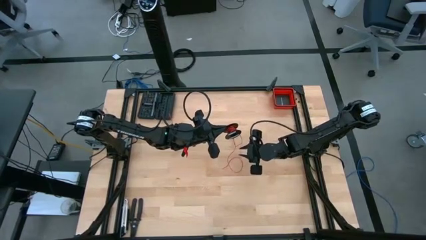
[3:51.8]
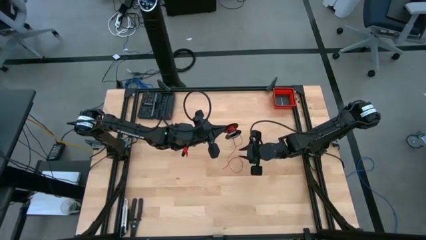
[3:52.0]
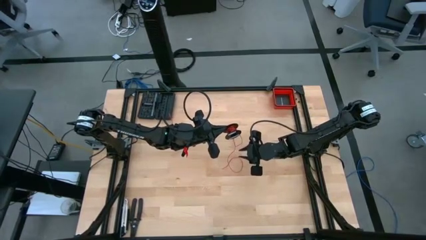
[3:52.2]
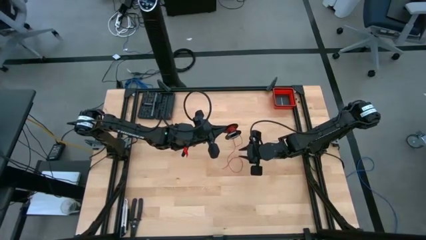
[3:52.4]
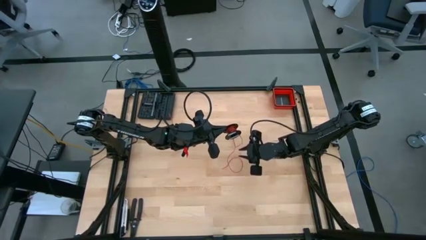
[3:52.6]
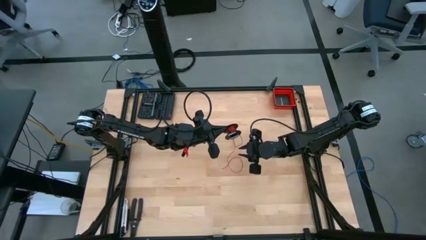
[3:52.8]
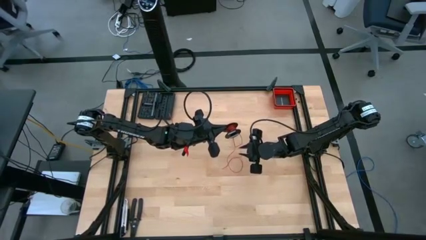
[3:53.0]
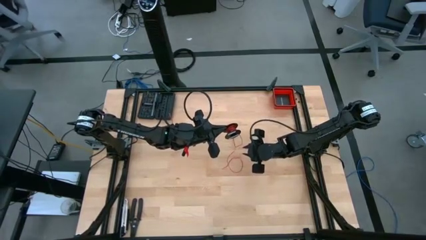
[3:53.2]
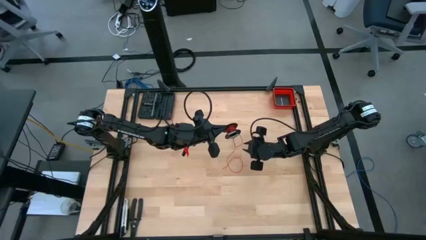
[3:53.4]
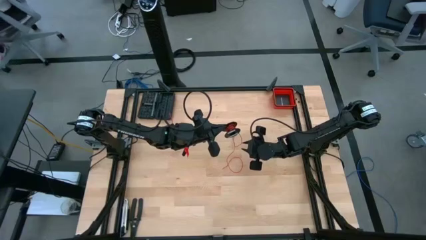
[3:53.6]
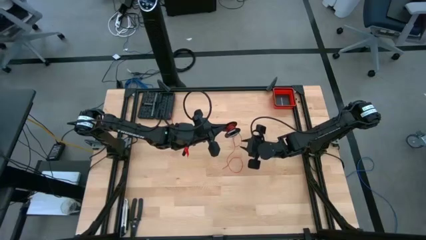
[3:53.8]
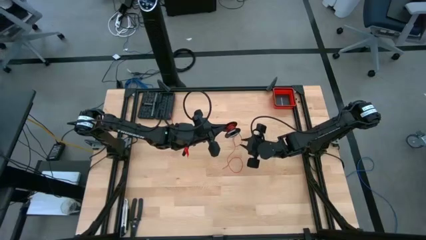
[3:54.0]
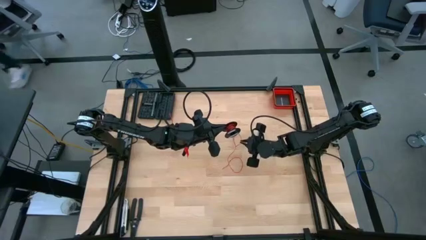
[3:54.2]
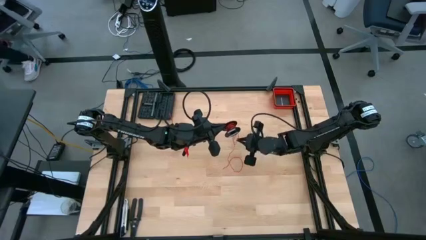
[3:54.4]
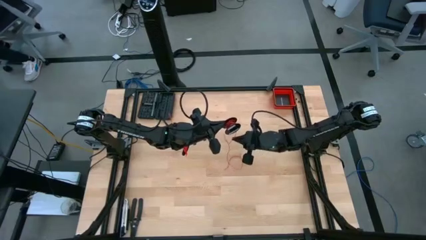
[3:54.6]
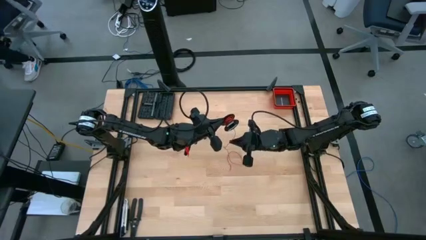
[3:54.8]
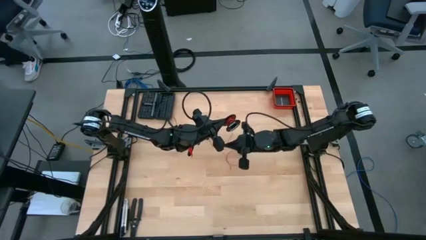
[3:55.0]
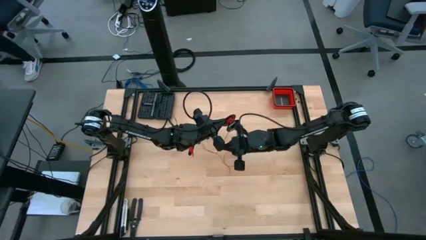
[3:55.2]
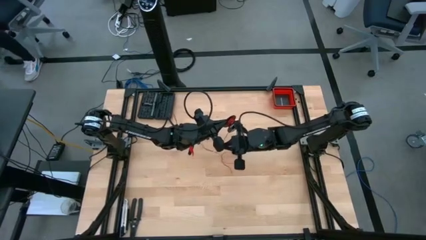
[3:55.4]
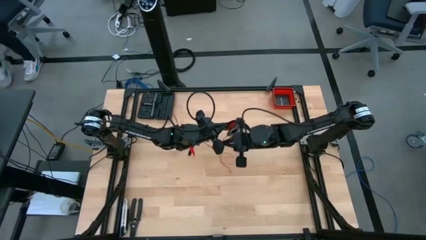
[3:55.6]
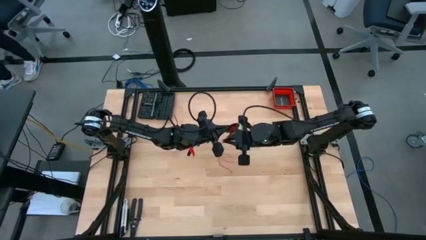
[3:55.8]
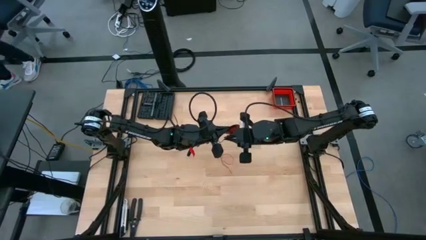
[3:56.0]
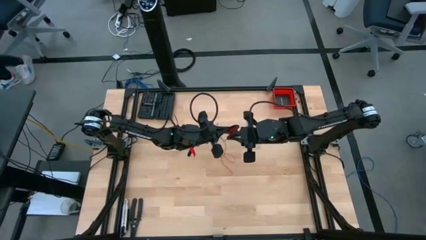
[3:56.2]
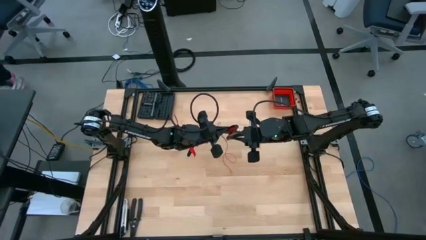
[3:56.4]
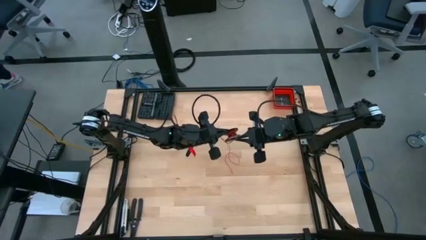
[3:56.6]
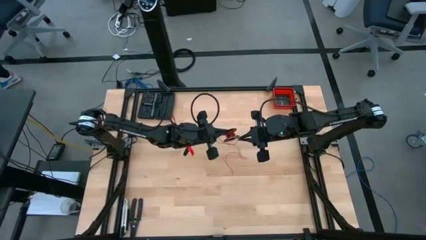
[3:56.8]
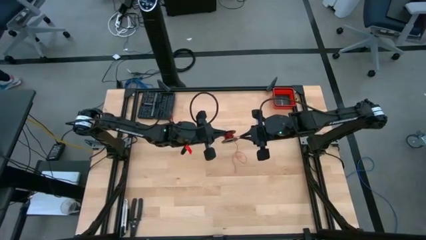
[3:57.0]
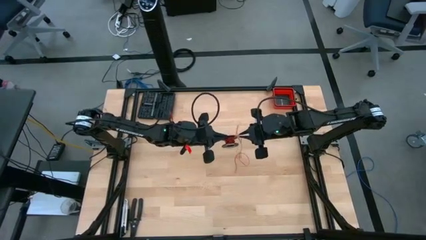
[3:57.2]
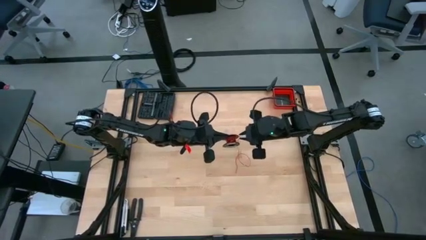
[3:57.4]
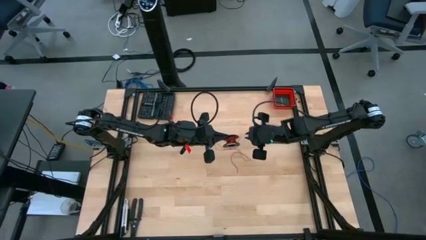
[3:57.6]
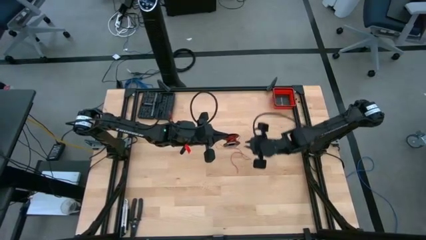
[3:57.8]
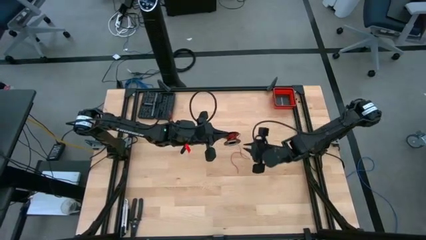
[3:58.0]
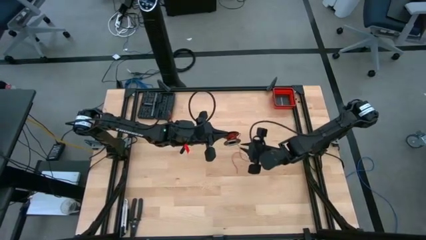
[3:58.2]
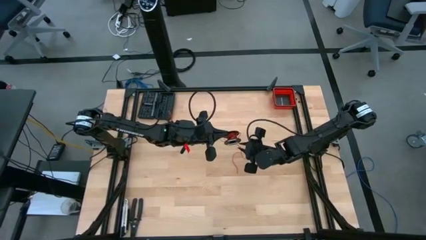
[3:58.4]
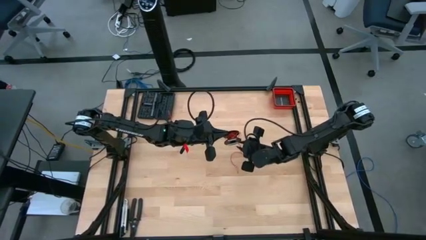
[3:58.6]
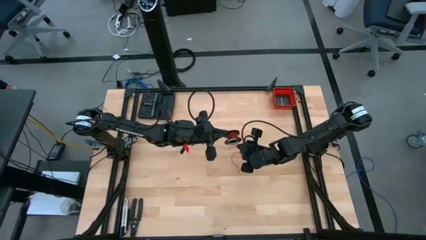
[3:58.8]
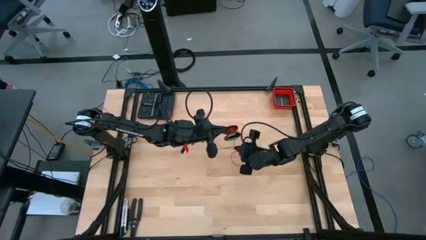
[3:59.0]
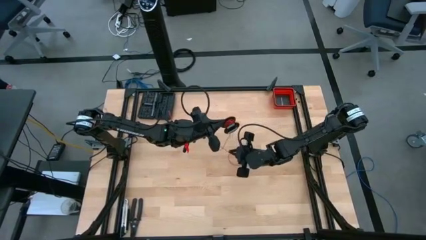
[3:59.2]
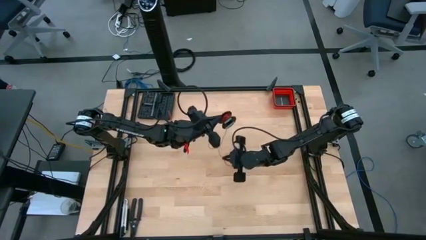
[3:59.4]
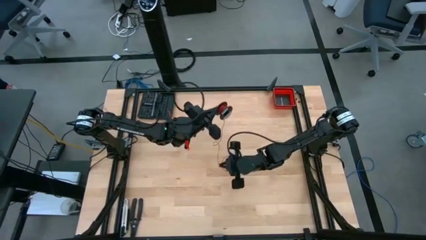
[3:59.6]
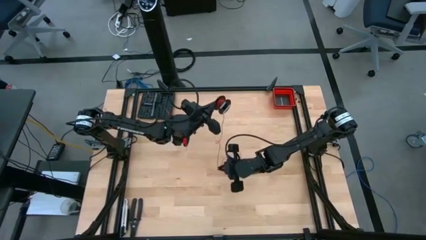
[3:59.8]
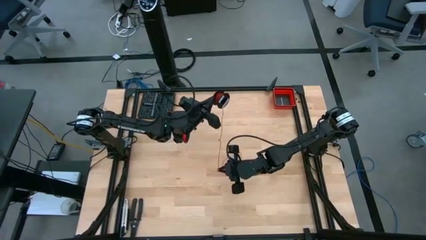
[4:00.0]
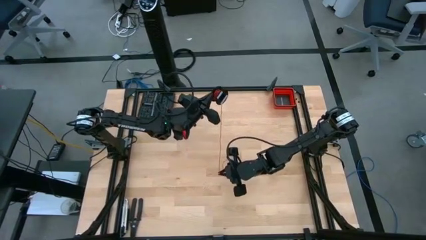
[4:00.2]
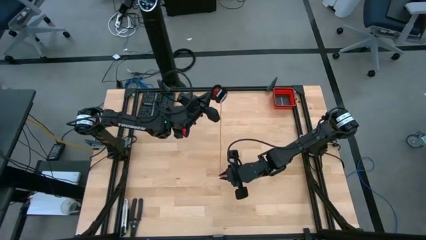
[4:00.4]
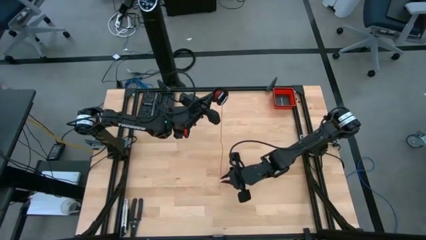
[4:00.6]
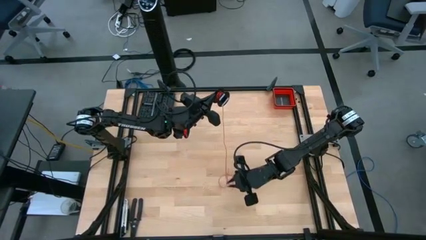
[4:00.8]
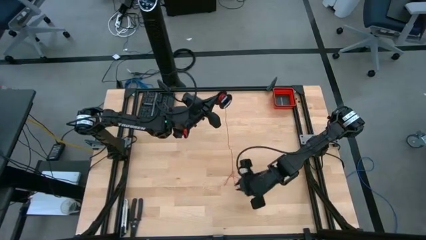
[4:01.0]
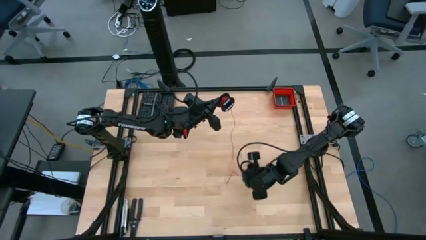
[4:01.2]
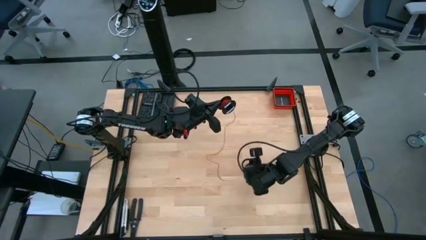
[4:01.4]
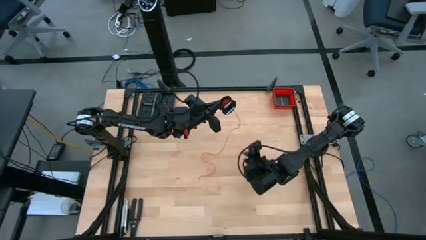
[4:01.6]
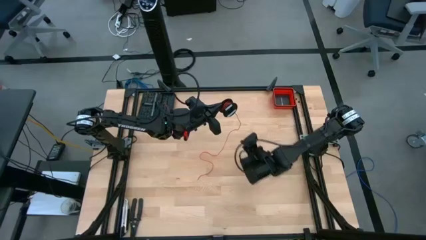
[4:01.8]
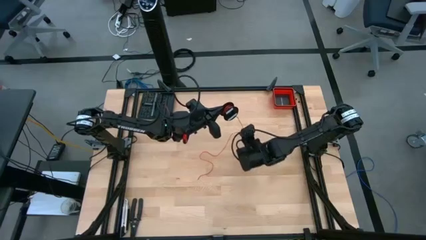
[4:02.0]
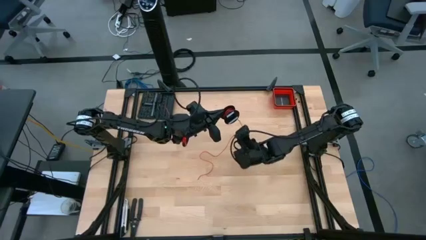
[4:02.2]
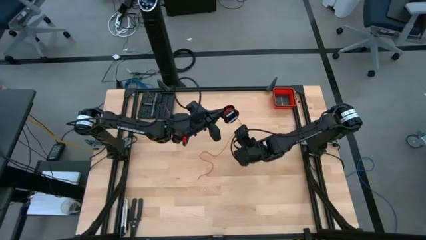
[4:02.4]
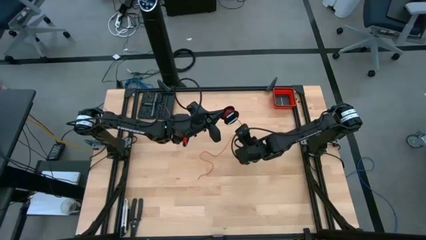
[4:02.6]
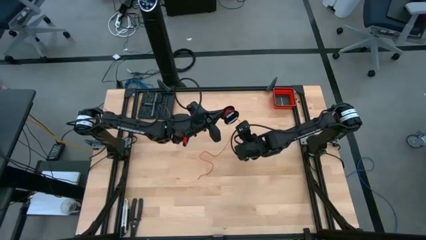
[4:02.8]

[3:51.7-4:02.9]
Task: Coil cords
Coil the red wire on the black spool

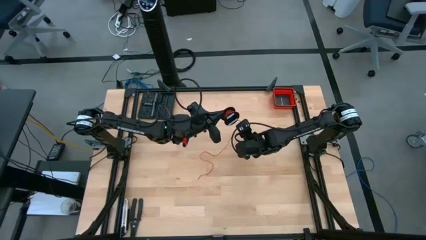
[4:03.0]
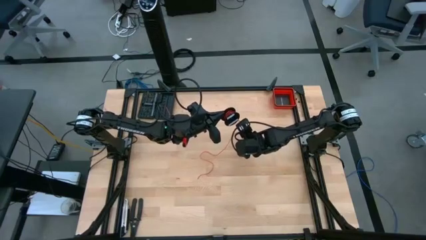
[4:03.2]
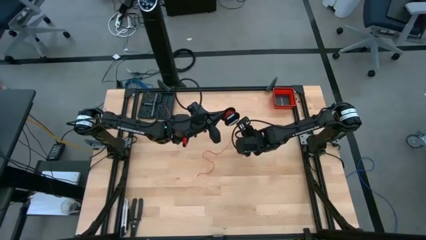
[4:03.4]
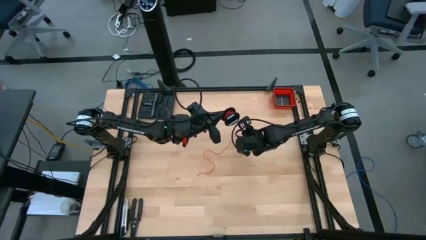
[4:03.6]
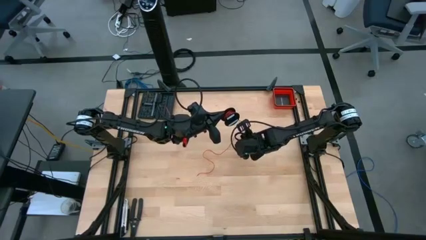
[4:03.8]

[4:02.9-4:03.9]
Coil the red wire on the black spool

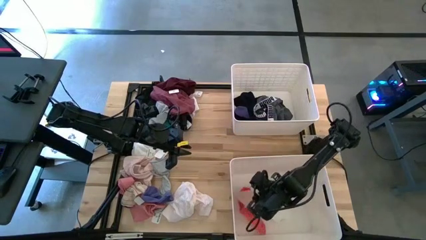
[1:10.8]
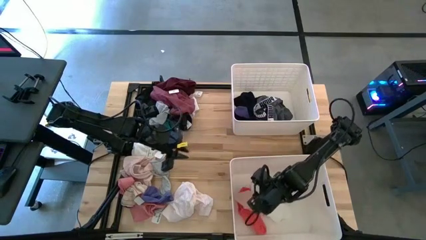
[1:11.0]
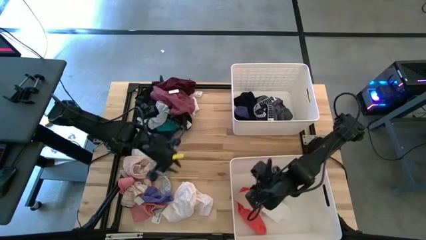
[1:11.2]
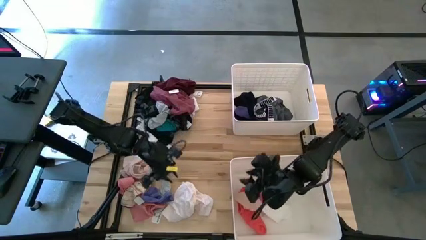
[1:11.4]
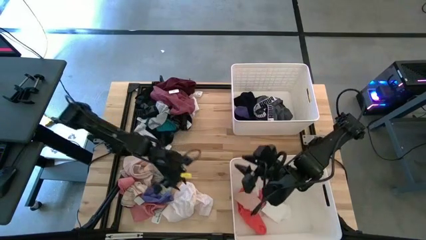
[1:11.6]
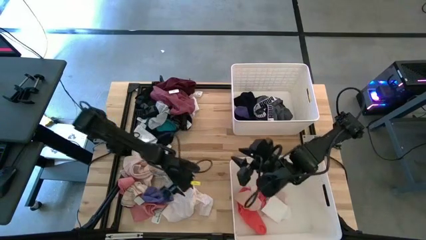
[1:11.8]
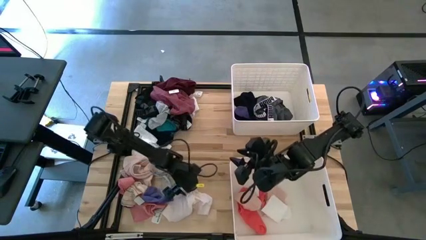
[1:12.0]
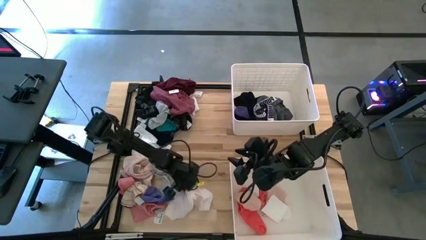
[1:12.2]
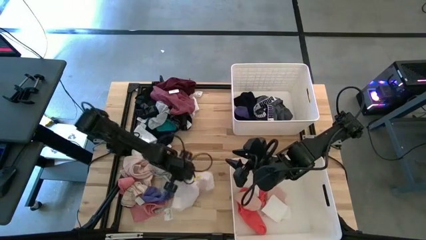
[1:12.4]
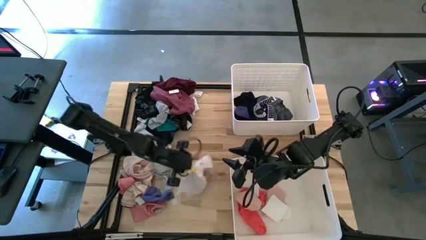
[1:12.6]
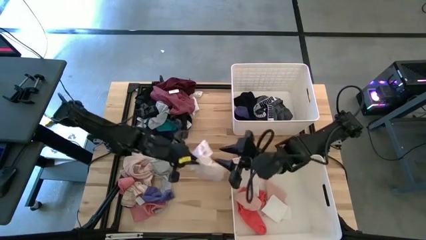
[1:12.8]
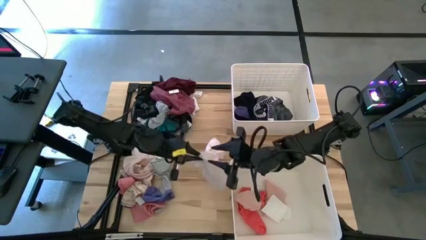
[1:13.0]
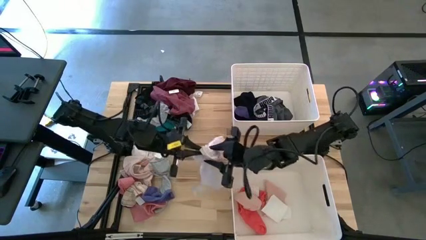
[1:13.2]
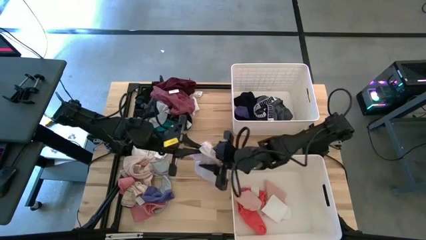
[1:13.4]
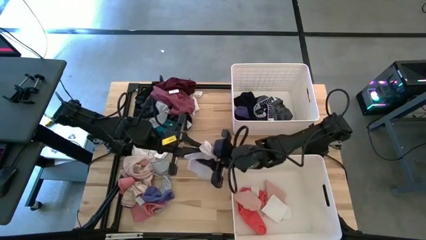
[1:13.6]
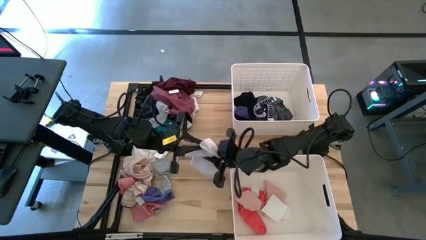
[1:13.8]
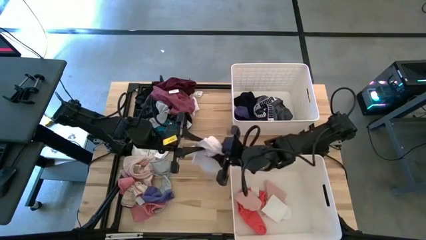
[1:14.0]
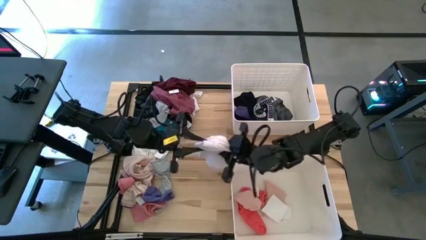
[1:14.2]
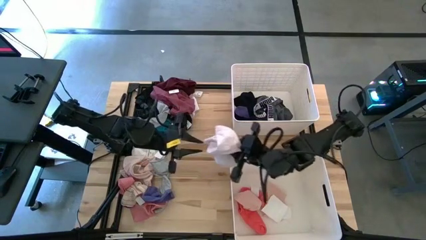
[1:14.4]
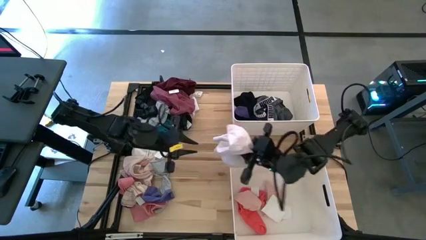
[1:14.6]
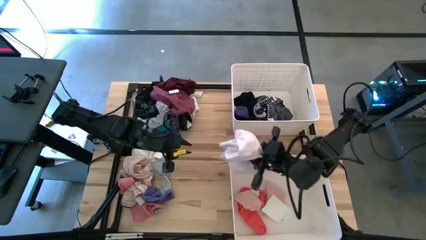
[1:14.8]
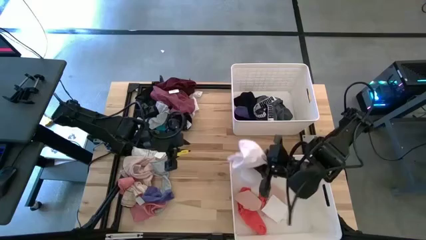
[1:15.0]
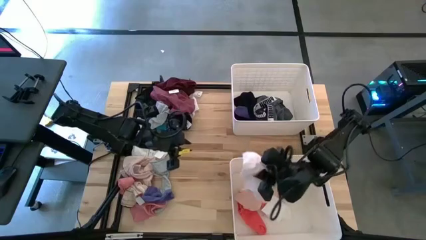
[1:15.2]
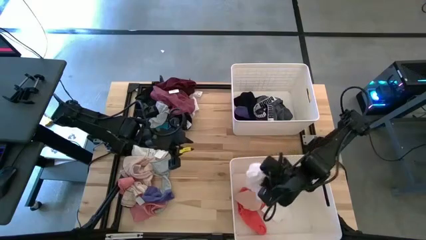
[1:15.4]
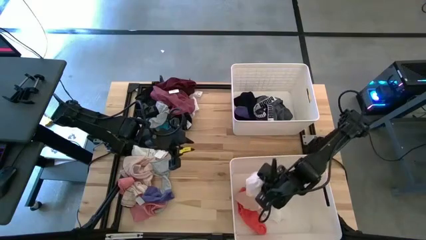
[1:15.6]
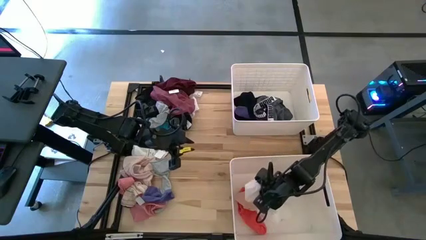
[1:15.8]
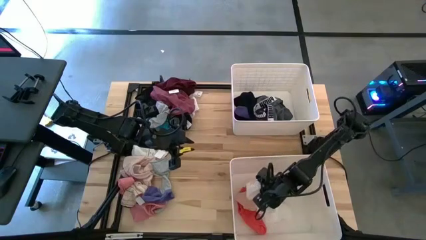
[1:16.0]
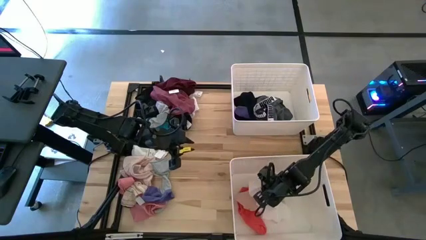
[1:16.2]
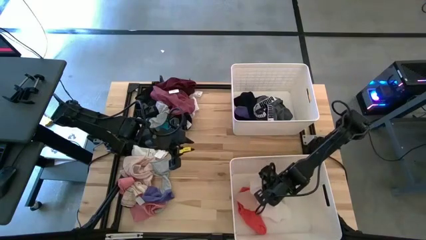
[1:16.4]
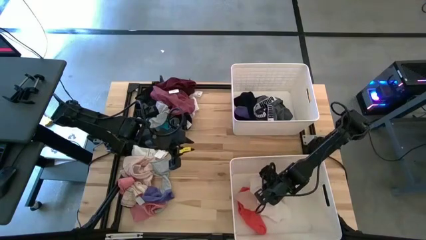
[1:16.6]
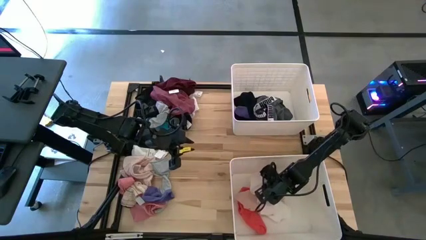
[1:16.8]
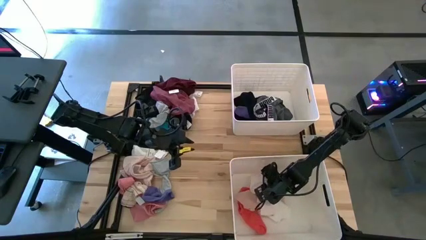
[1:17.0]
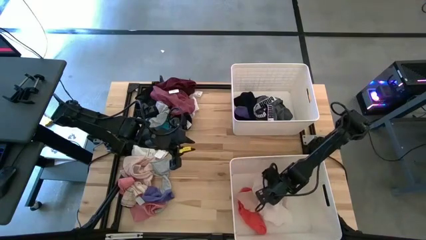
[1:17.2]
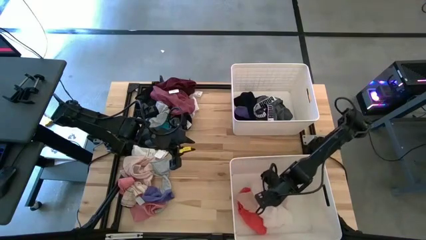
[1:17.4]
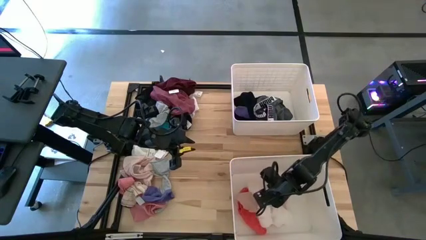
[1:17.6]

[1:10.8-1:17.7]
Task: Sort clothes
Put the white shirt into the bottom bin
